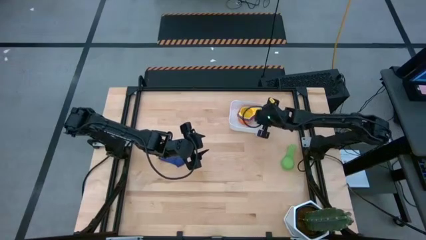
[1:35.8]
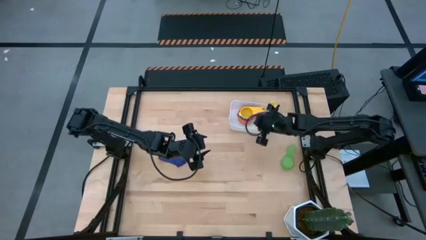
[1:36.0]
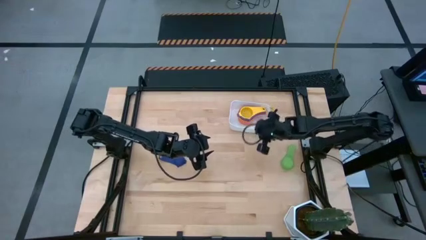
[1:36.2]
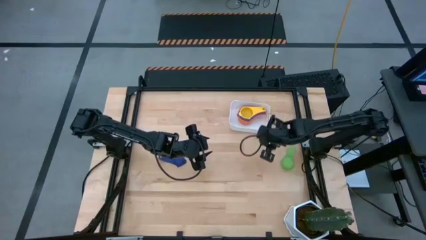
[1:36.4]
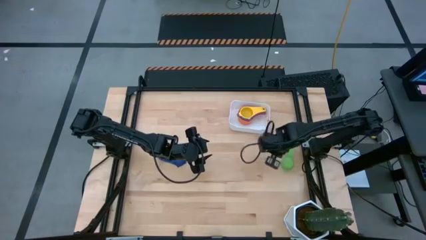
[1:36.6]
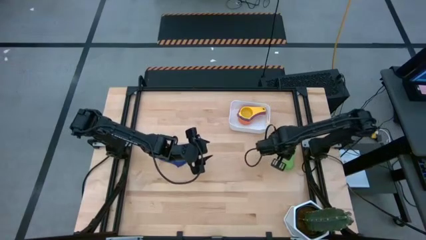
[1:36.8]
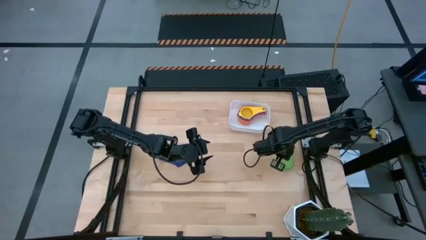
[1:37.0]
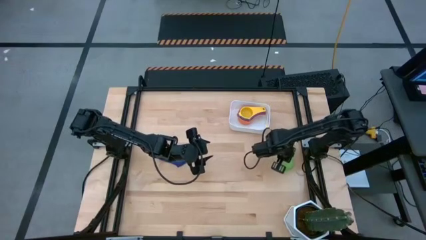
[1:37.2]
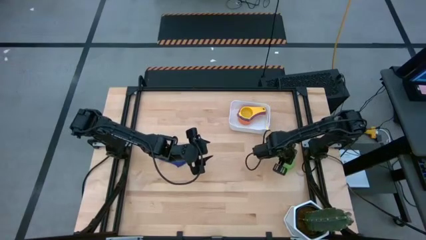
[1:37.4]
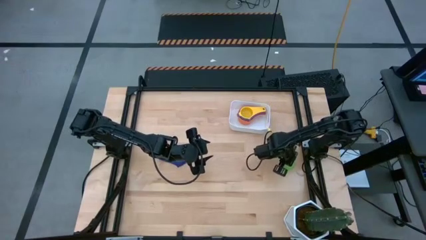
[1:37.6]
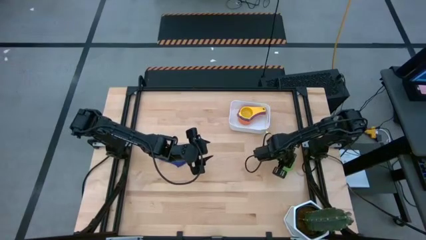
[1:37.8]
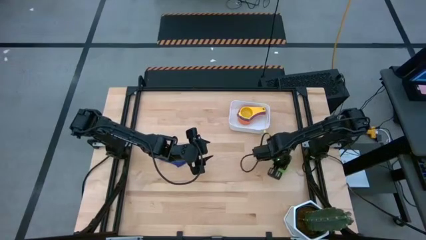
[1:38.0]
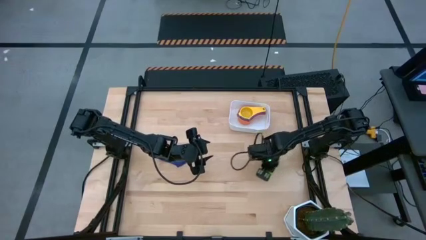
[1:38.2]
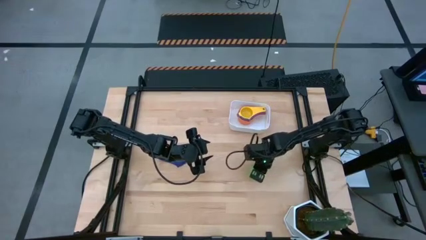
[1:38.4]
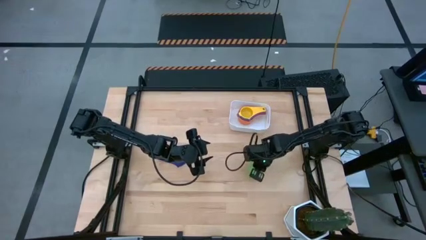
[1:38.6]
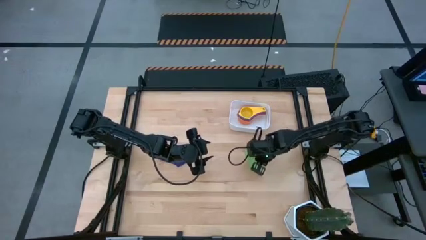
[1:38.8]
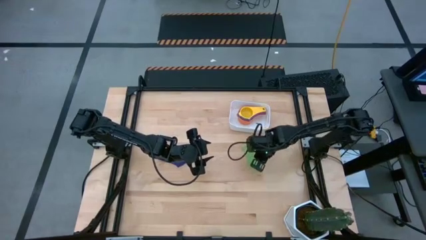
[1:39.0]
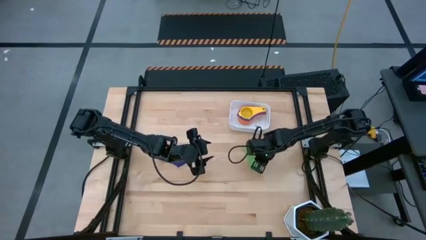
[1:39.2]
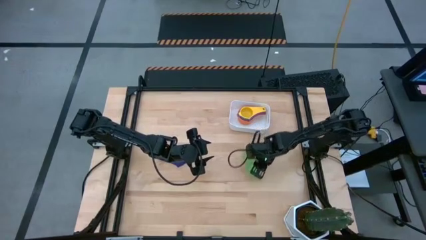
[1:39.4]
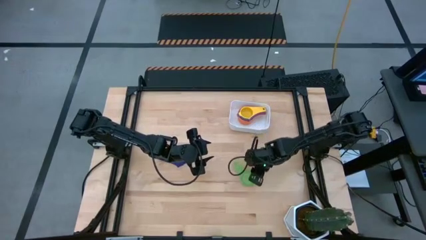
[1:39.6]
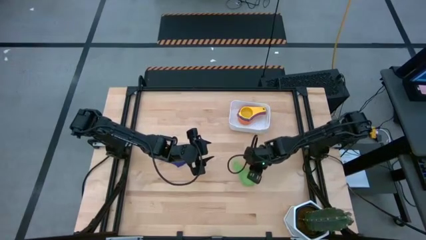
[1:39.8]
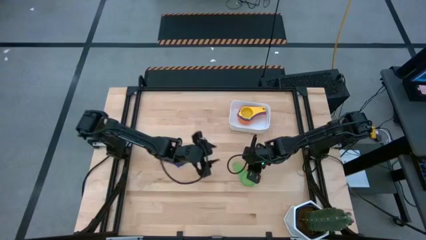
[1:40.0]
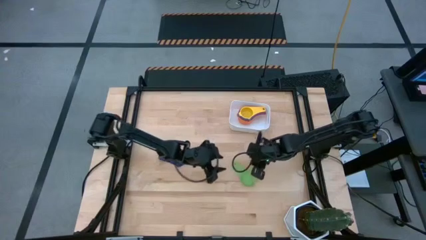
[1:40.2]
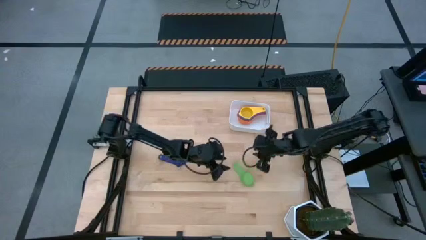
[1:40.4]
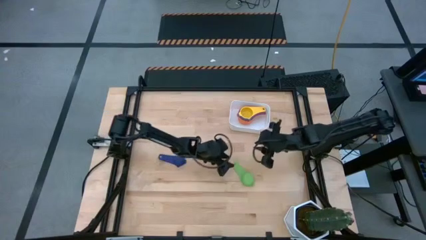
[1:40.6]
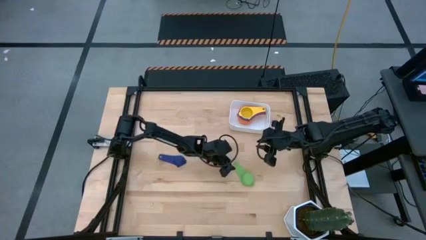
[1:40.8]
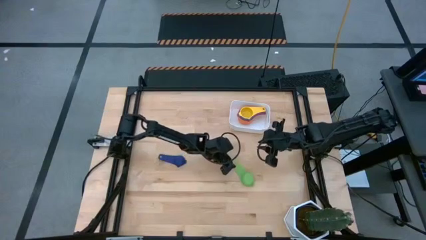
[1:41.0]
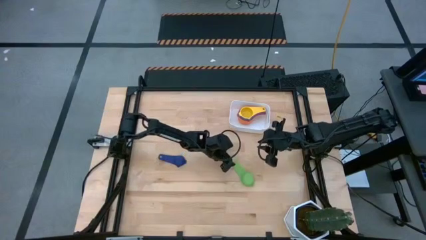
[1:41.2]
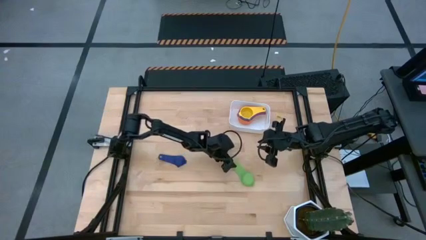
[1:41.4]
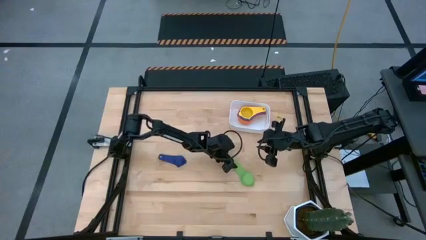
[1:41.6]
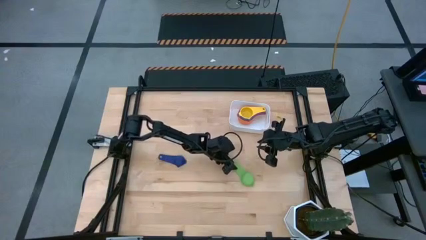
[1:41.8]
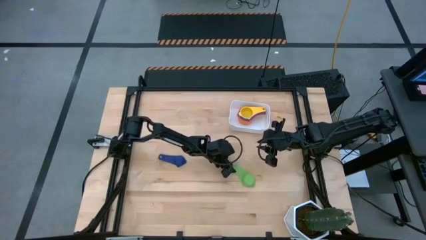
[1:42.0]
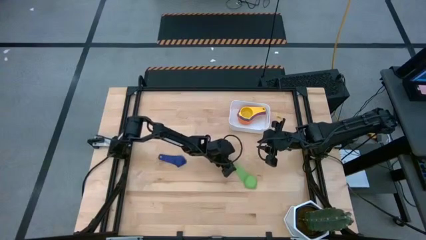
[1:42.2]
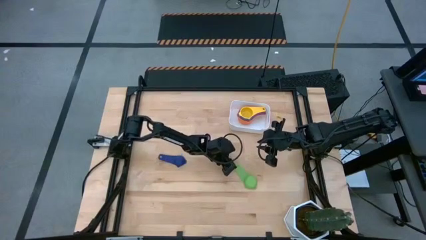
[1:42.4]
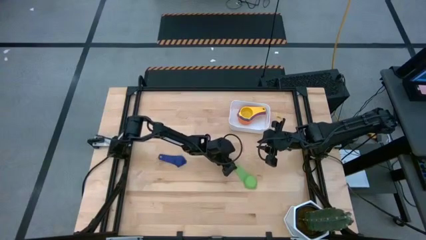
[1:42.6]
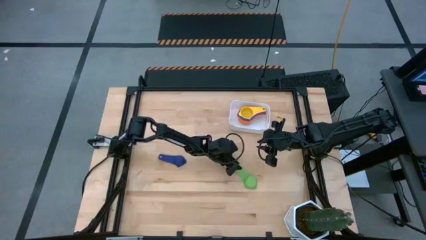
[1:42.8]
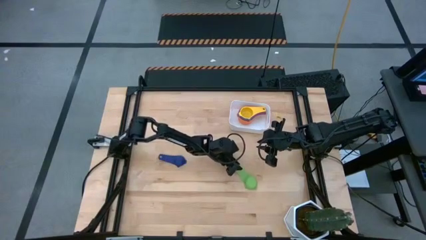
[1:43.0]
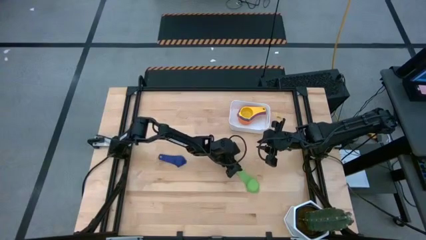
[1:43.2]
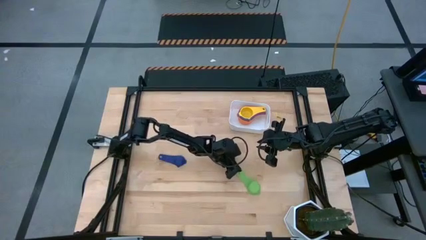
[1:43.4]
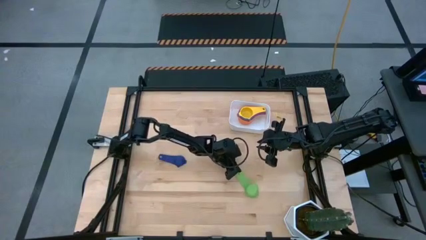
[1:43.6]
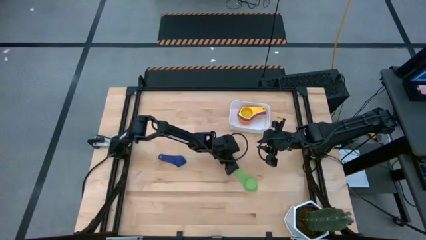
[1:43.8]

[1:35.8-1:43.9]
Task: Nest measuring cups in basket
Stack the green measuring cup on top of the yellow measuring cup in the white bin

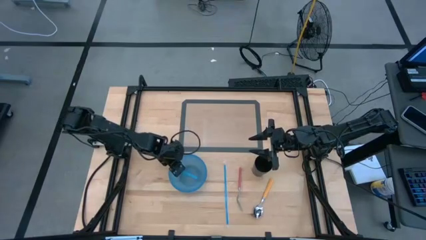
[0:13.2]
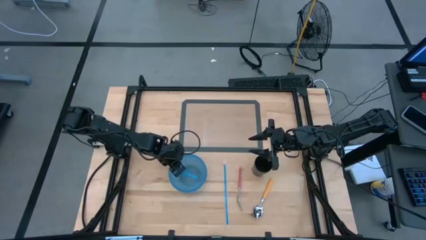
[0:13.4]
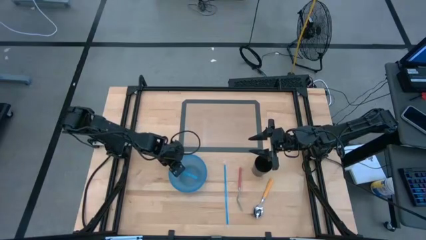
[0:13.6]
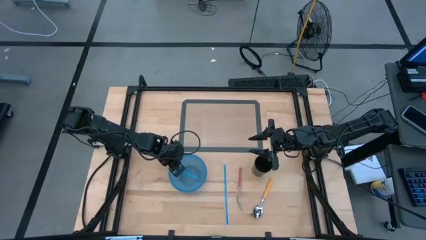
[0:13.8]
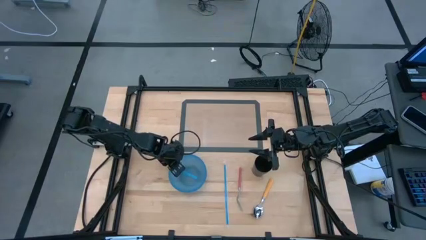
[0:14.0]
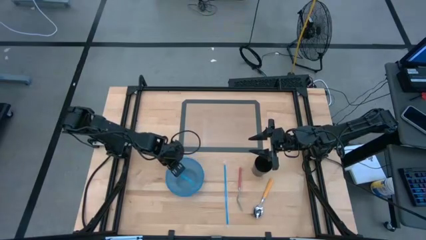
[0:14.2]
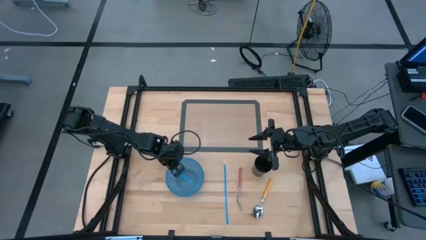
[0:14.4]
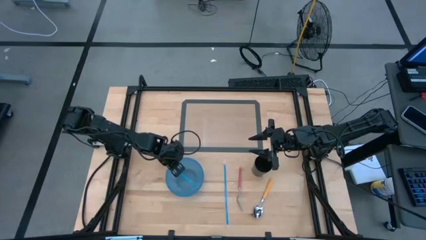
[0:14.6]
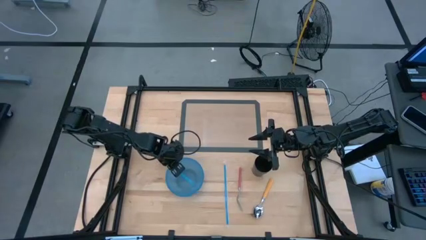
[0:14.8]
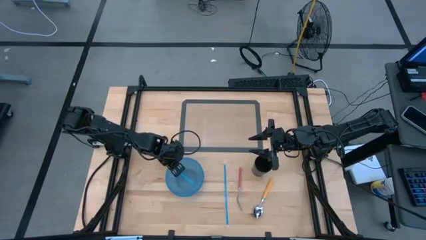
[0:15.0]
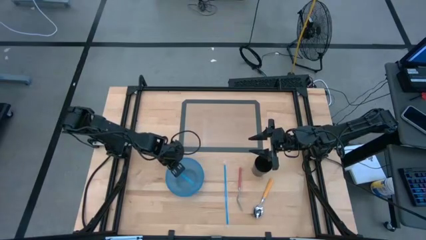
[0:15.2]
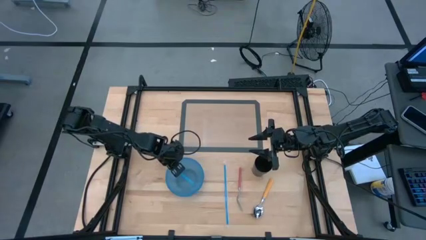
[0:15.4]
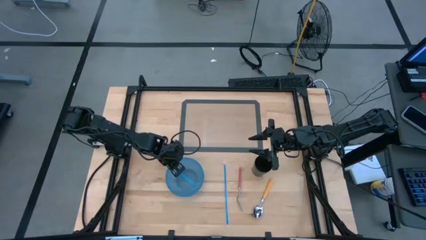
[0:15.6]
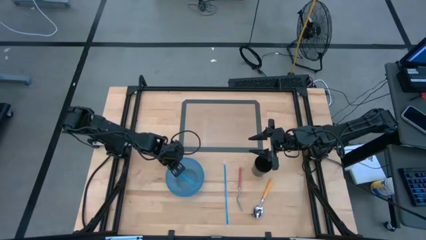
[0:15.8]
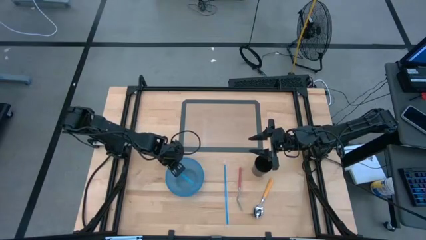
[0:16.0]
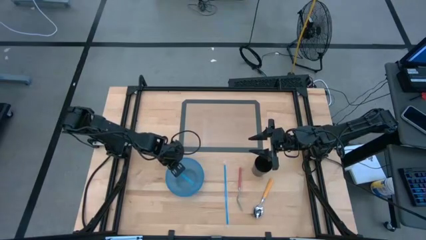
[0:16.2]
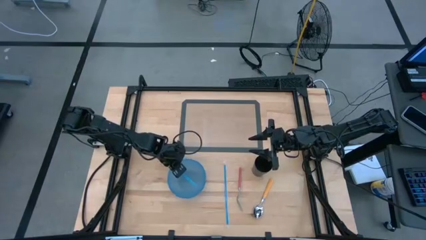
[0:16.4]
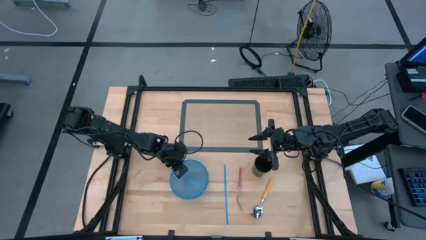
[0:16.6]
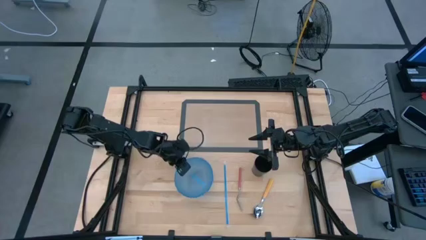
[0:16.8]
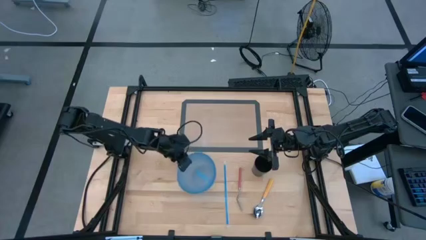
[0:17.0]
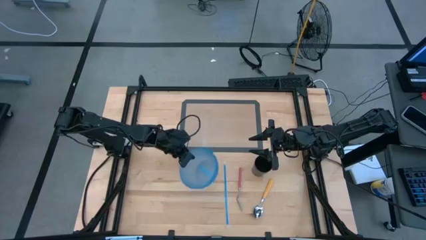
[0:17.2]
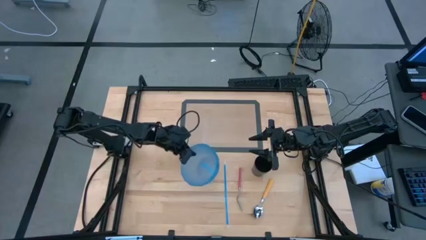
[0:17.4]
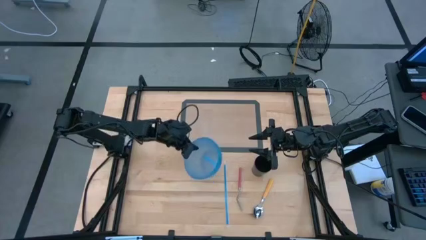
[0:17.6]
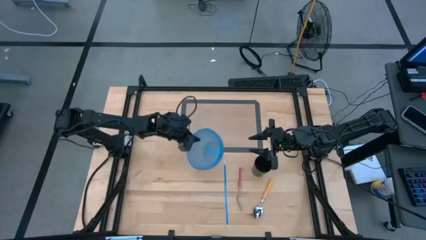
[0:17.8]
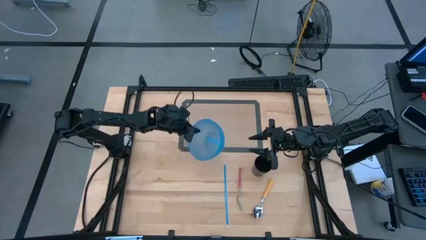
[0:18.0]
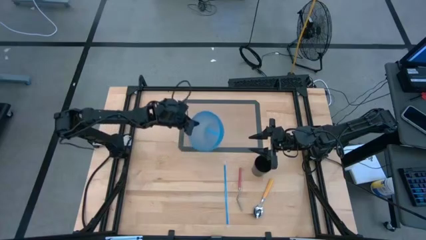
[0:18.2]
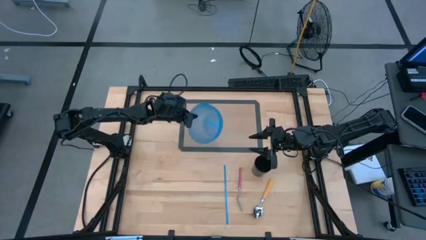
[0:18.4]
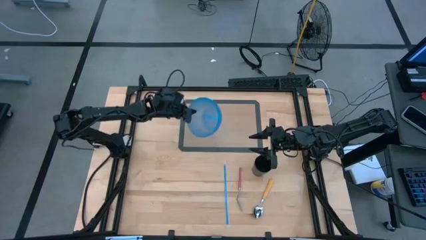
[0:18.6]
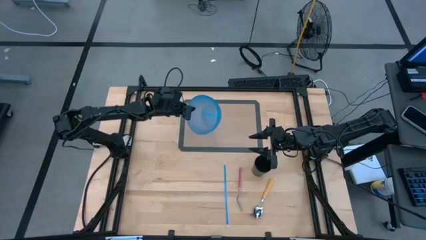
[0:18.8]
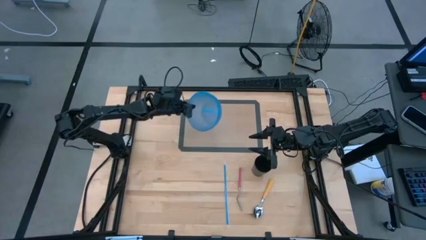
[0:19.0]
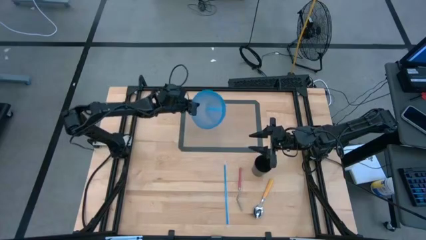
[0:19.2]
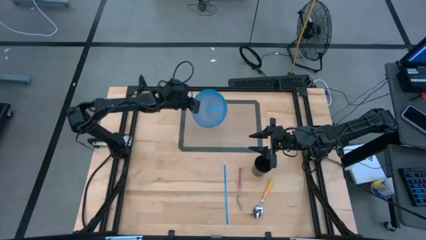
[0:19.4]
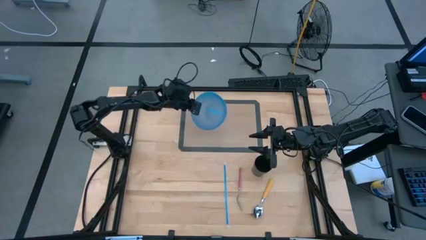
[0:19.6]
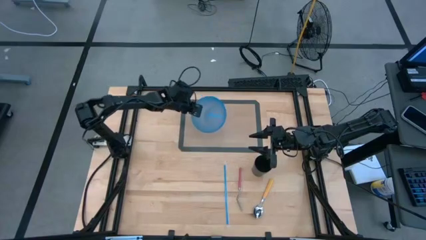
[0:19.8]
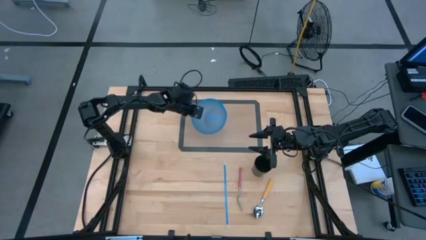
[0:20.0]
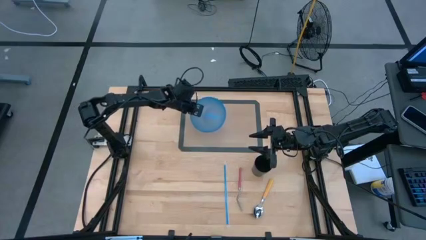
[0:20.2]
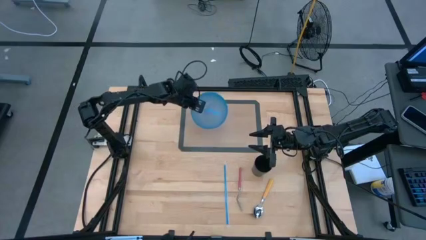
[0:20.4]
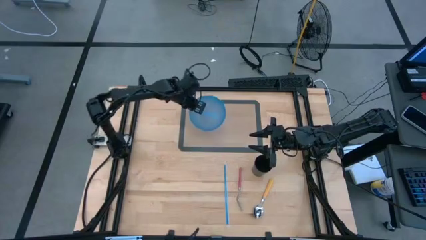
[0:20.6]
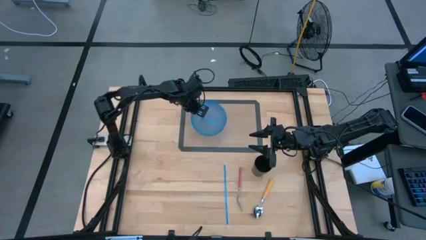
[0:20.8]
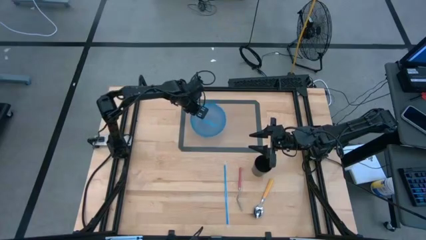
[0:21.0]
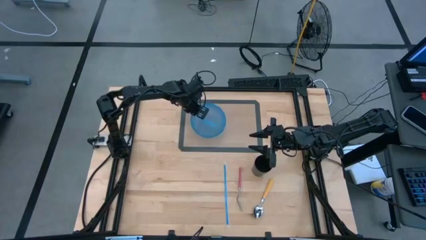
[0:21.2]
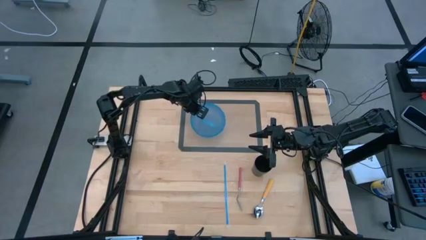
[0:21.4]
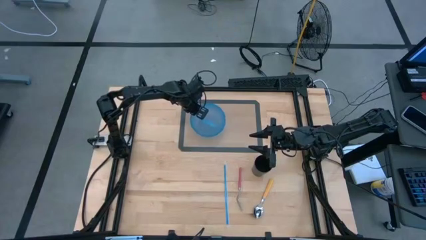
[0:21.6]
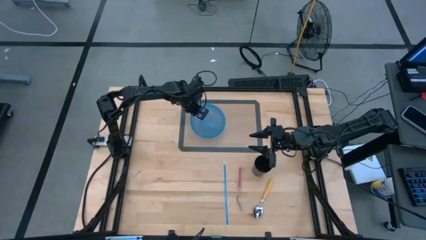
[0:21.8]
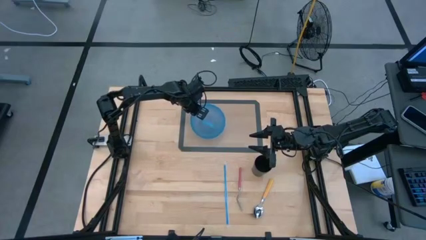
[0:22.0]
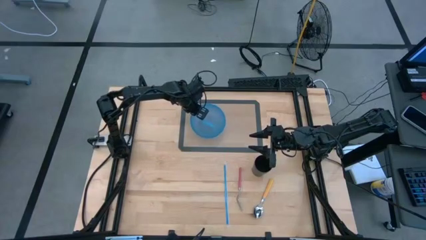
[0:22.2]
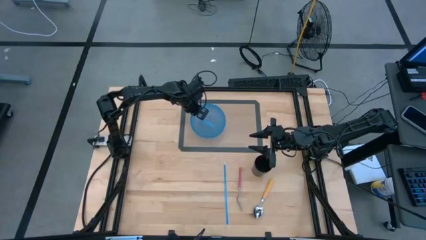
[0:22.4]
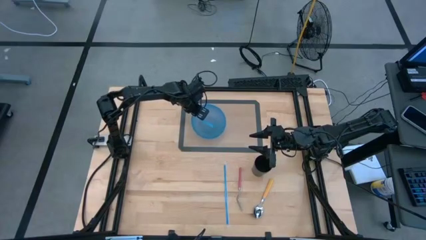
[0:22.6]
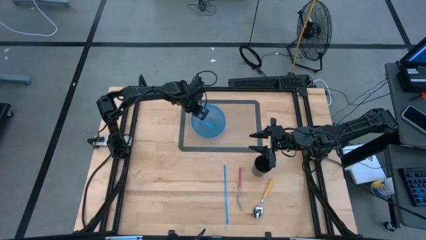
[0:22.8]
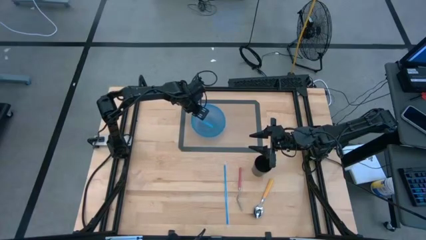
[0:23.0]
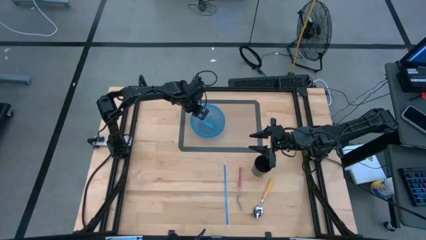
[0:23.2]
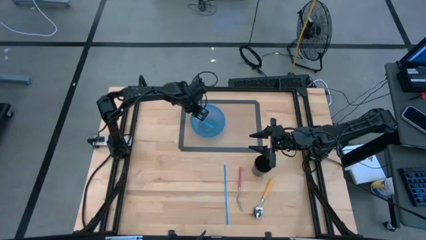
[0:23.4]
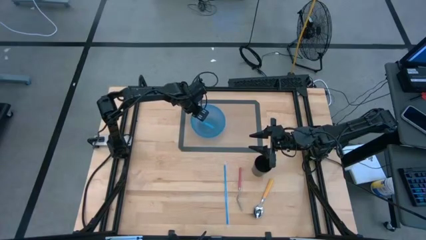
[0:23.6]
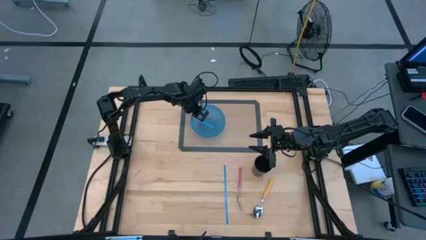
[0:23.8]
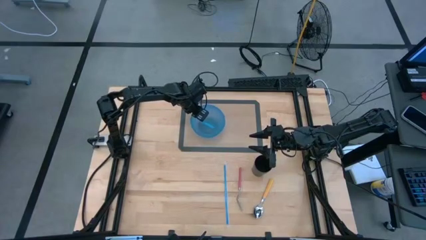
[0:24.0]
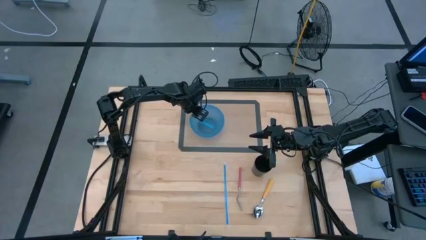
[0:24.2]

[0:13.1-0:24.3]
Task: Pick & Place Utensil
Put the blue bowl on the left side of the placemat
